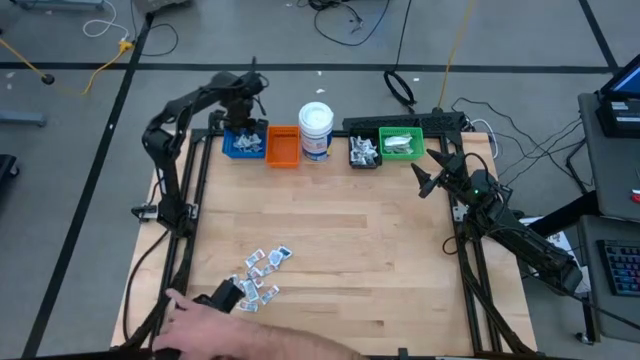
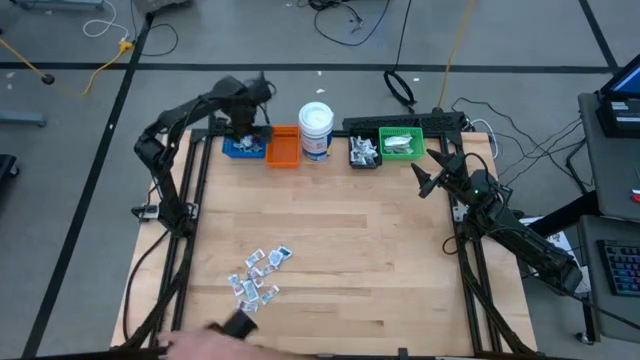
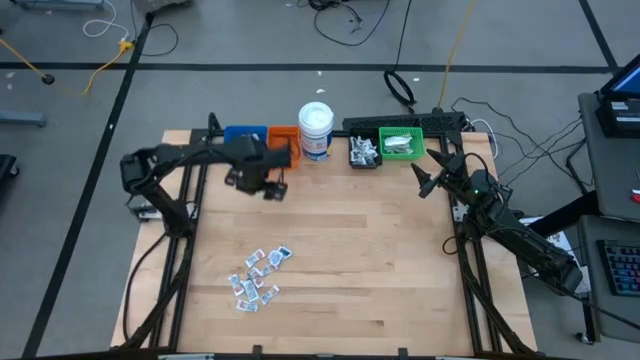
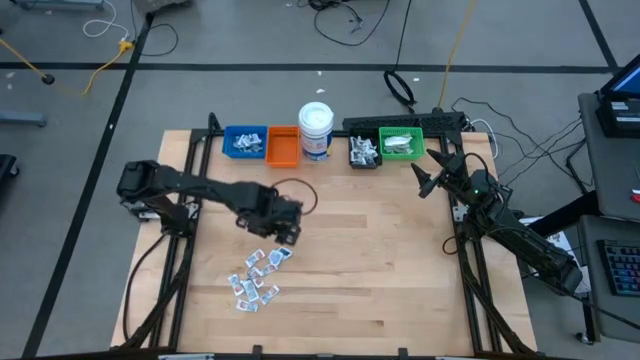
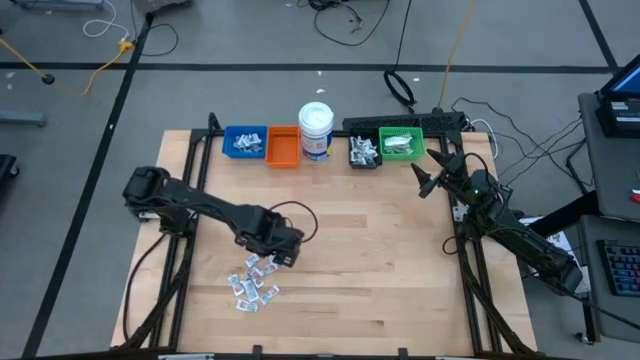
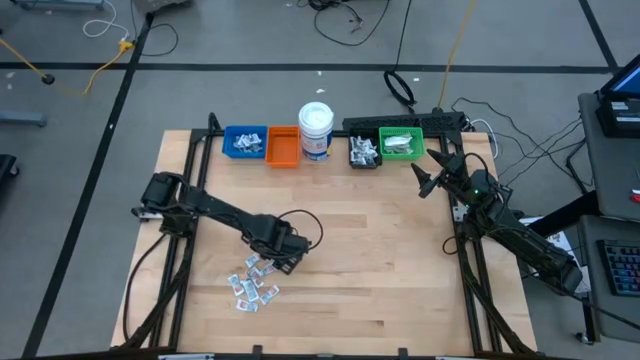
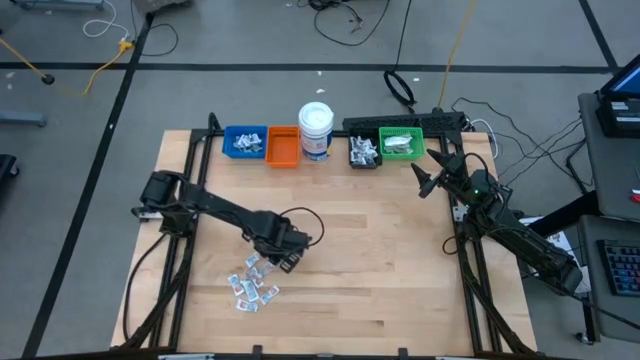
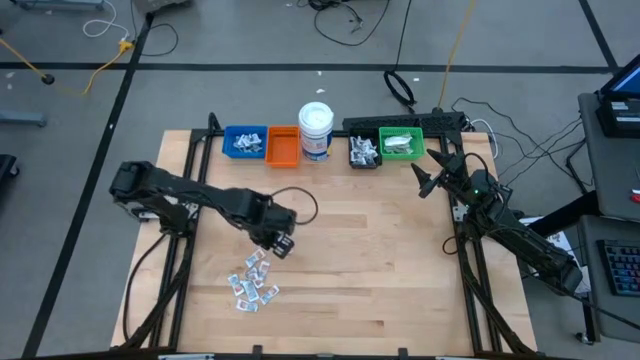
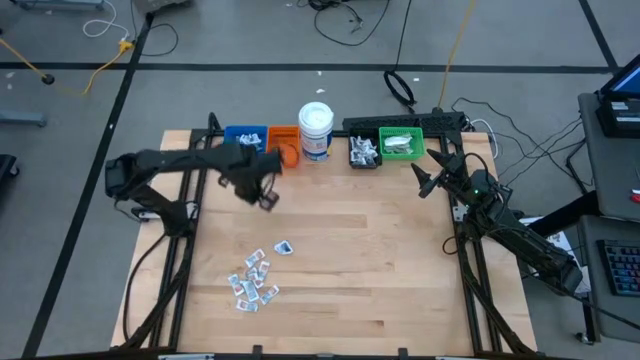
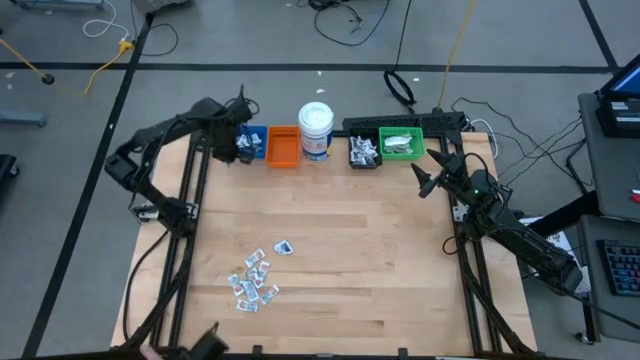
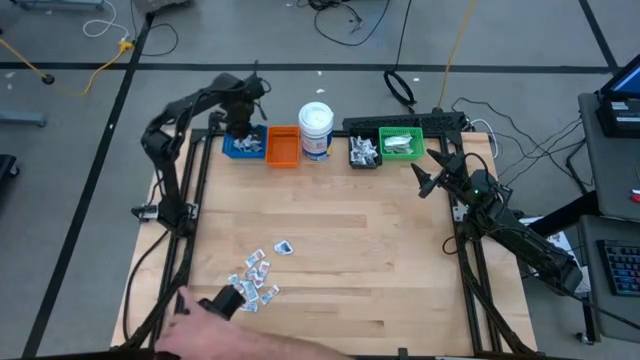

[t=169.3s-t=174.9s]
Task: Pick & Place First Aid Supplies
Put the alcohol pad into the blue bin

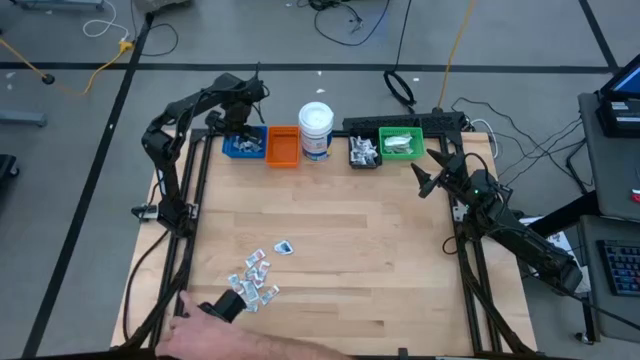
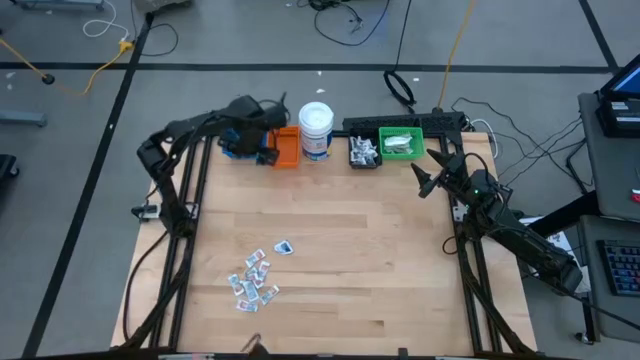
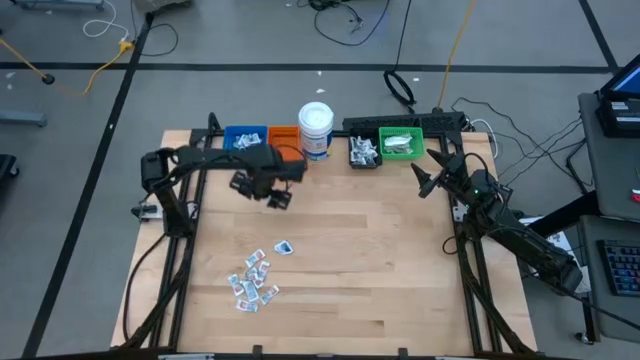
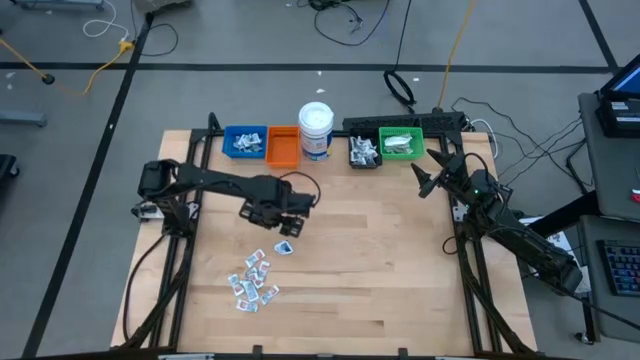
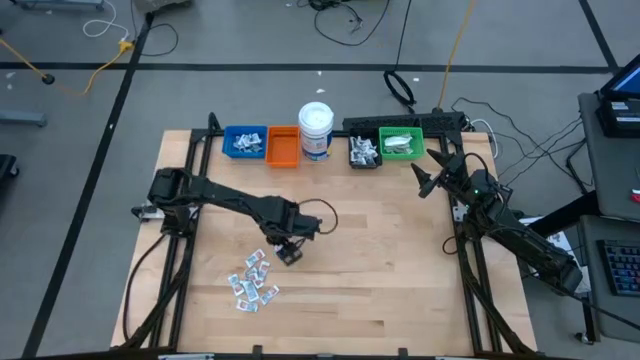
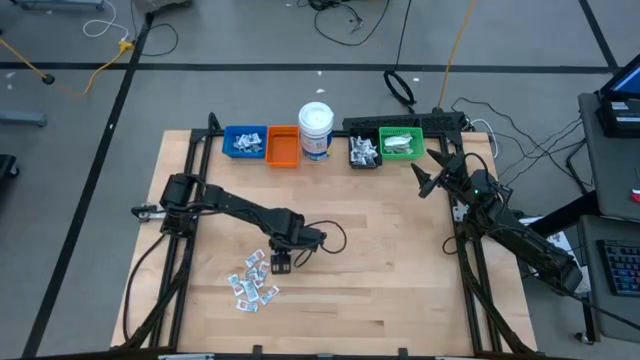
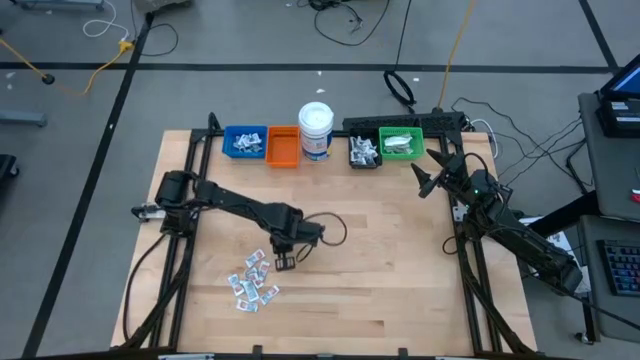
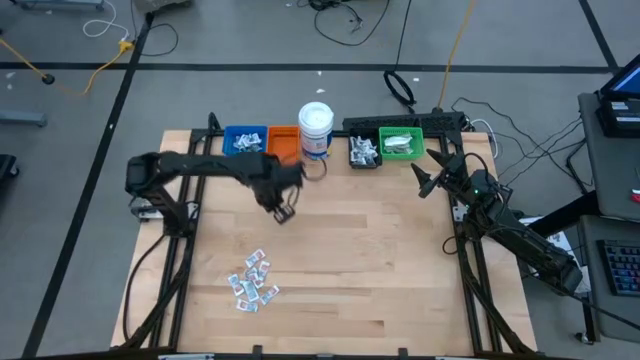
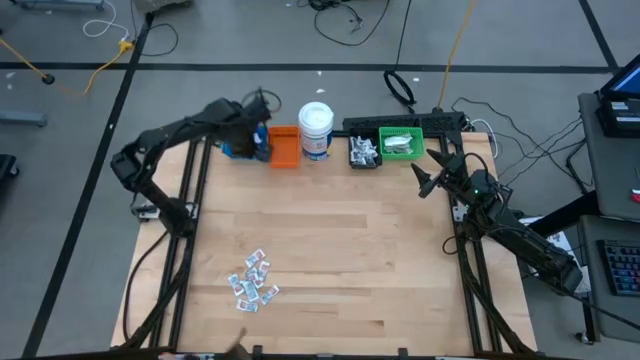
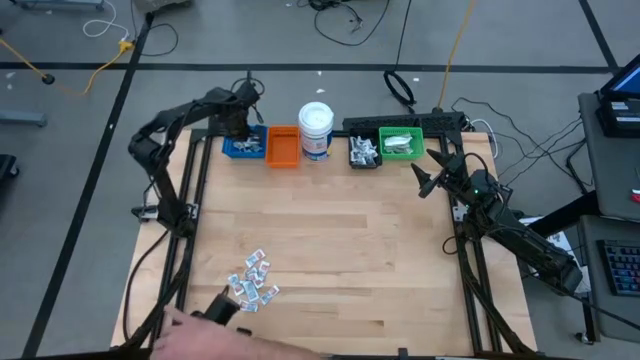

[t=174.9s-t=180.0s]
Put the alcohol pad into the blue bin

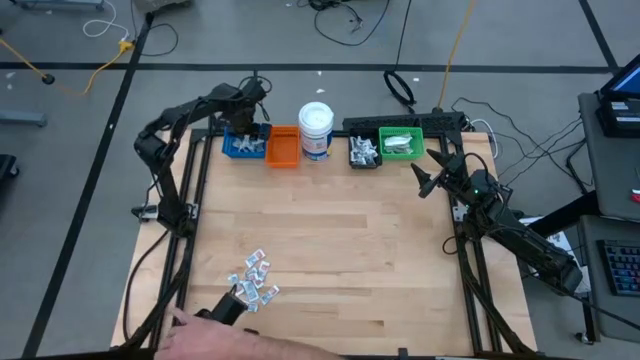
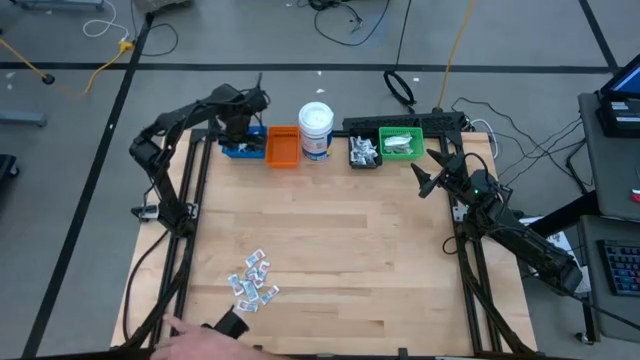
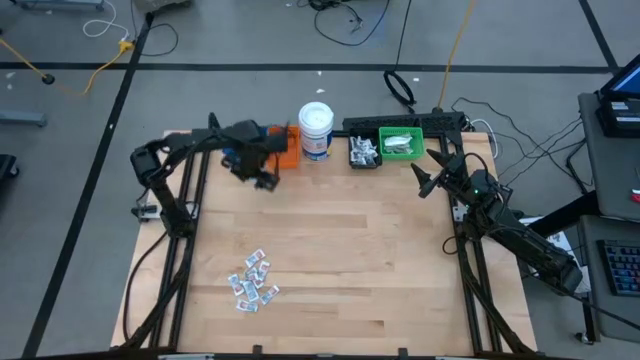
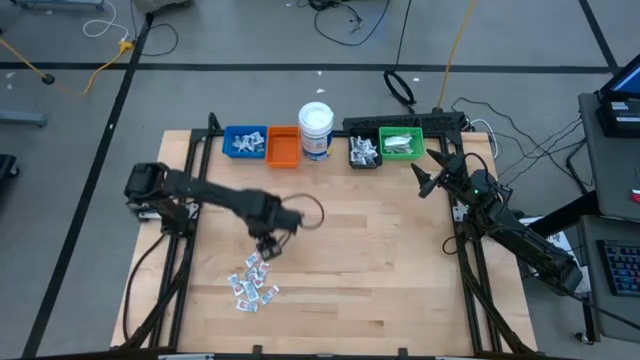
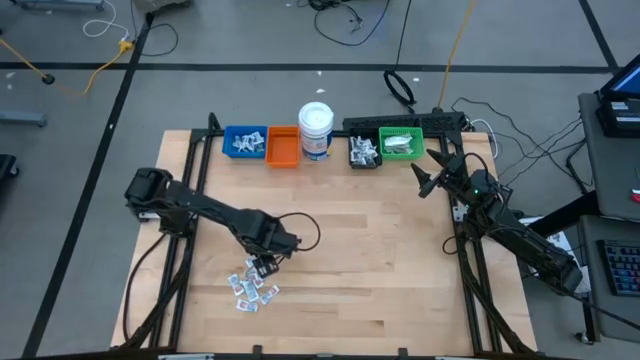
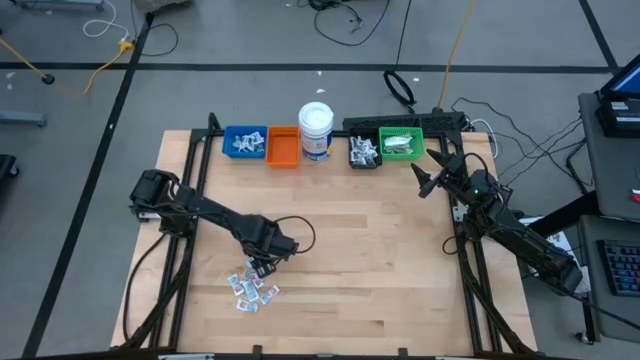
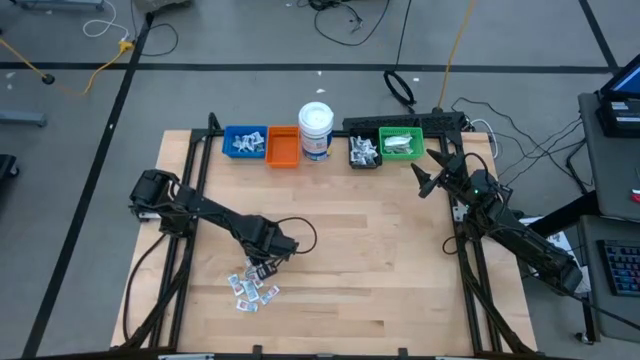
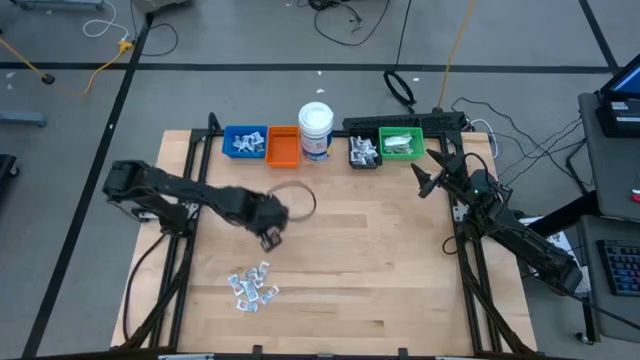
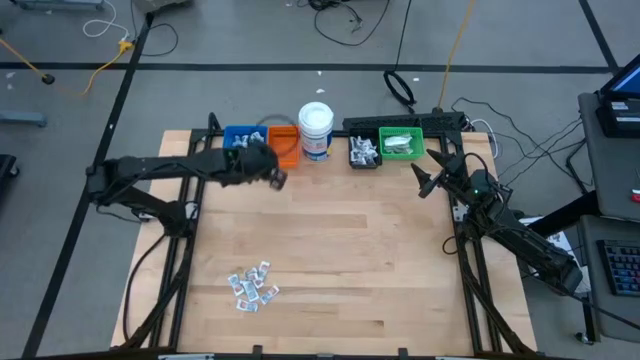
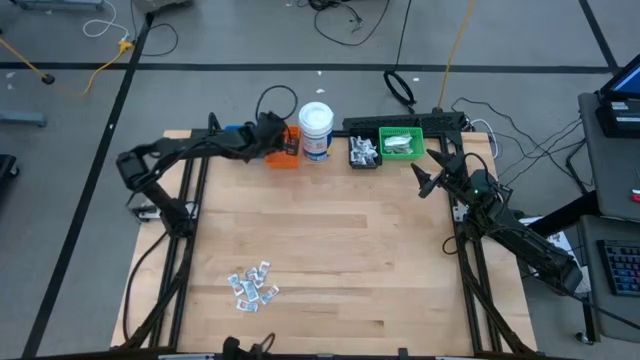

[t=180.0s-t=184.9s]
Put the ointment pack into the orange bin

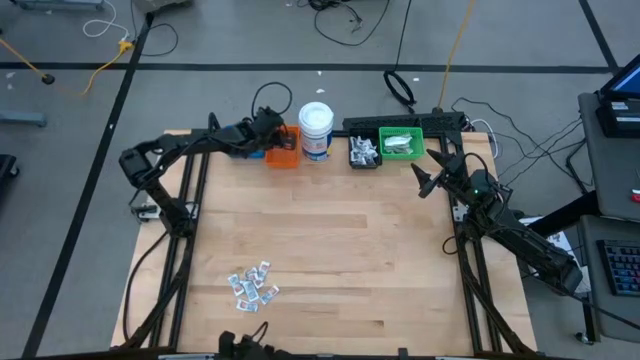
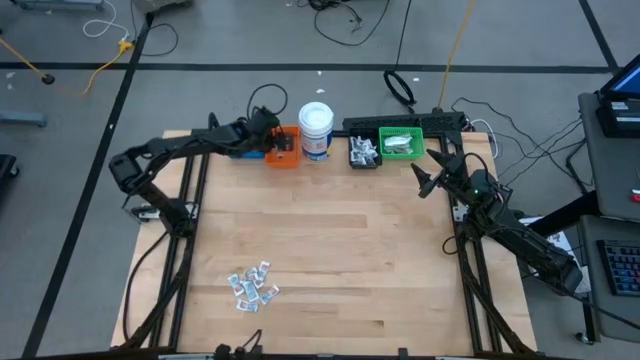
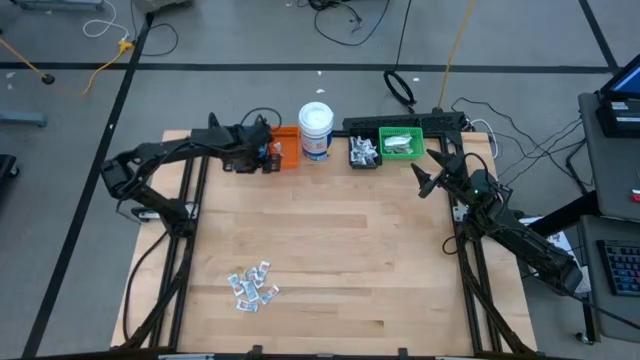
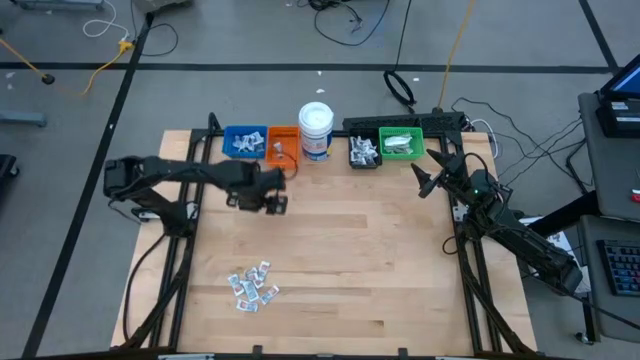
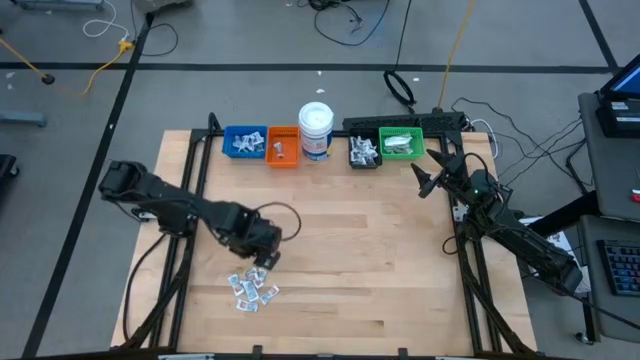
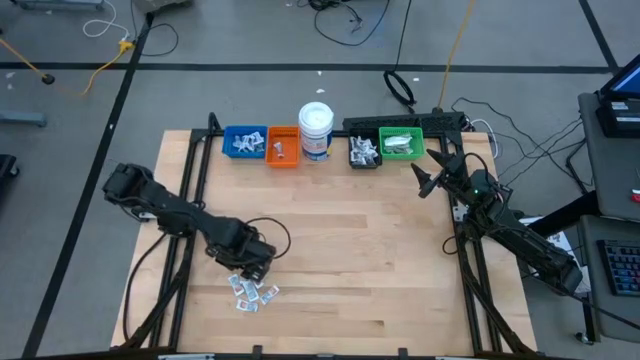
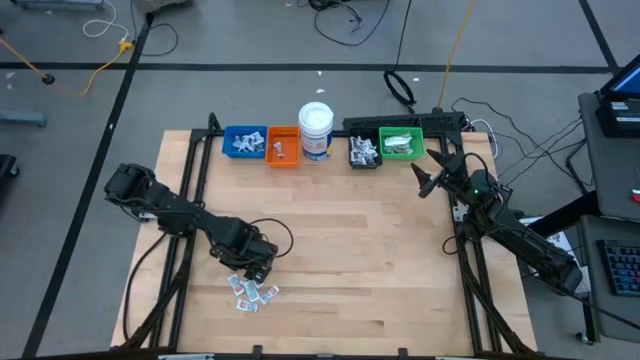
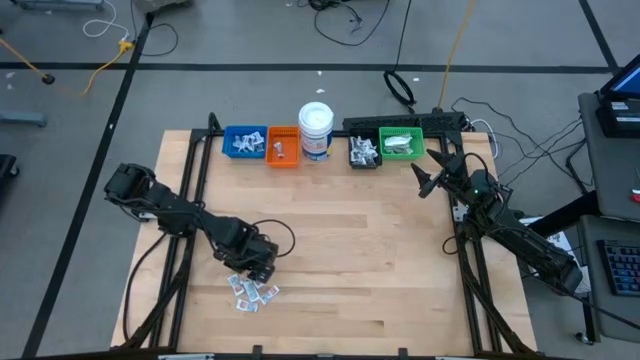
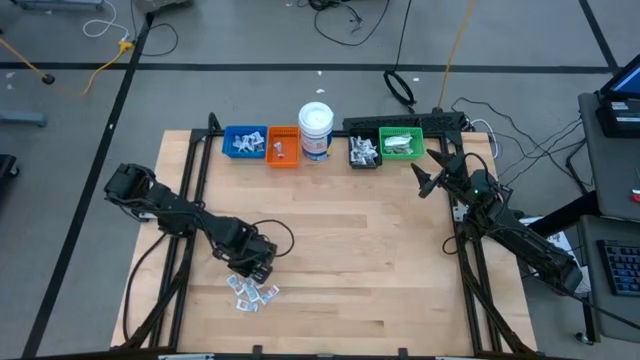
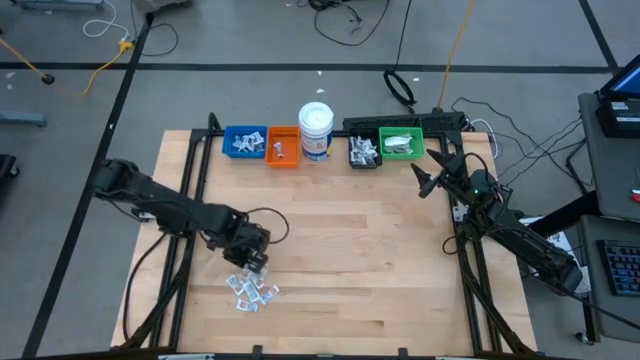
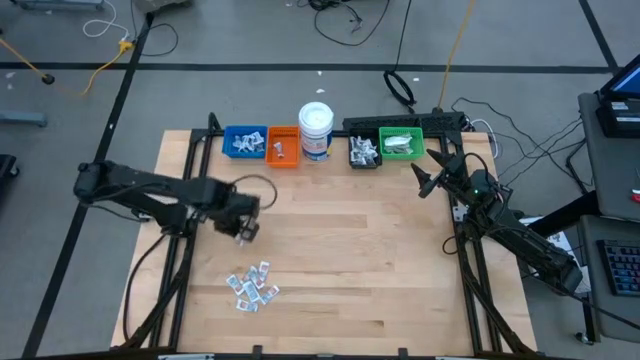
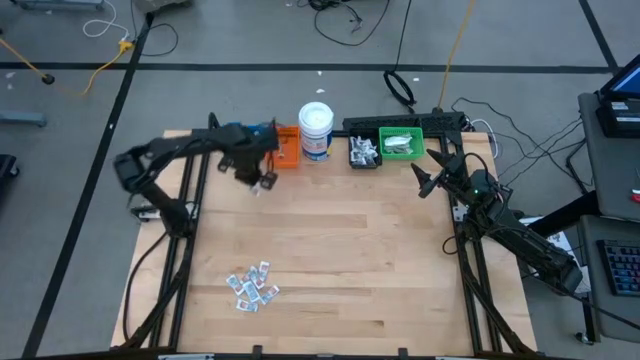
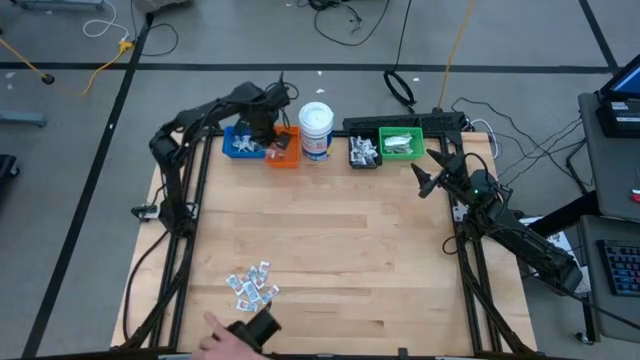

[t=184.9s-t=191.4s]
Put the ointment pack into the orange bin
